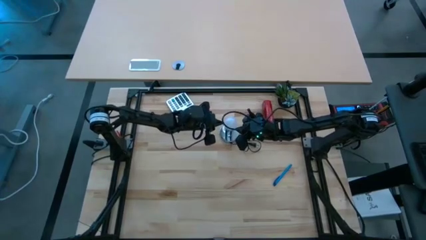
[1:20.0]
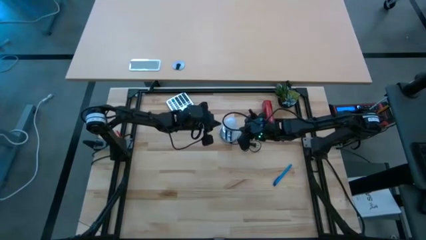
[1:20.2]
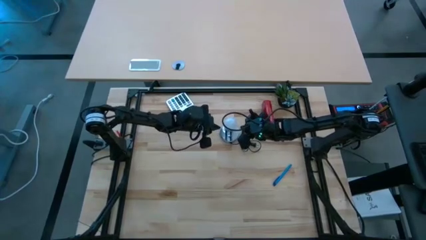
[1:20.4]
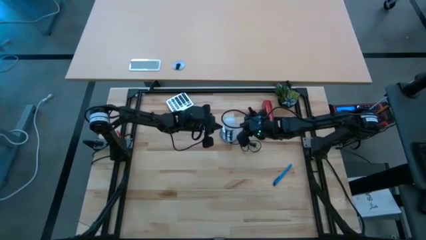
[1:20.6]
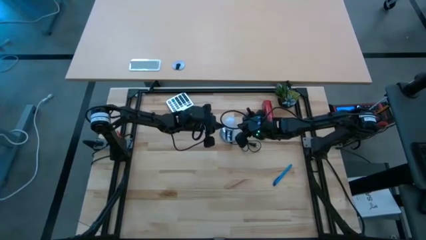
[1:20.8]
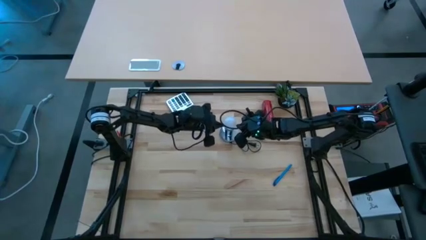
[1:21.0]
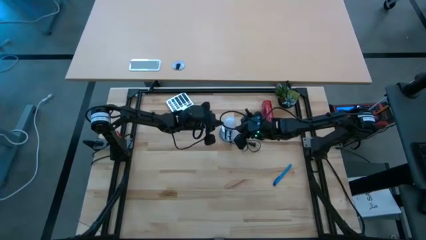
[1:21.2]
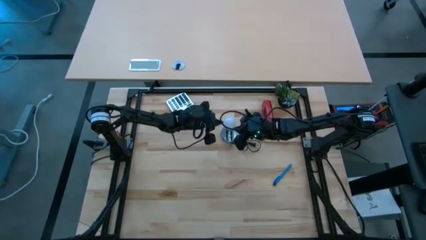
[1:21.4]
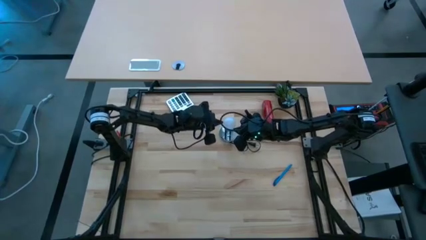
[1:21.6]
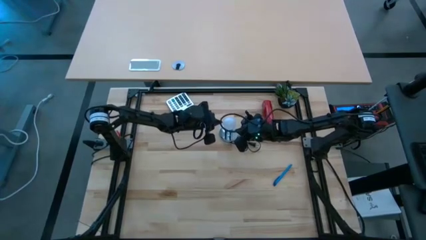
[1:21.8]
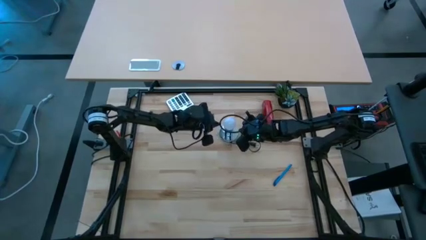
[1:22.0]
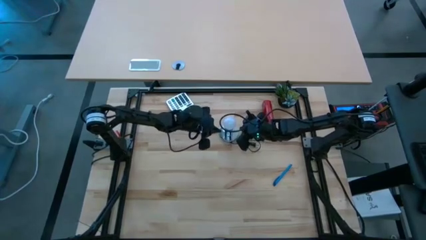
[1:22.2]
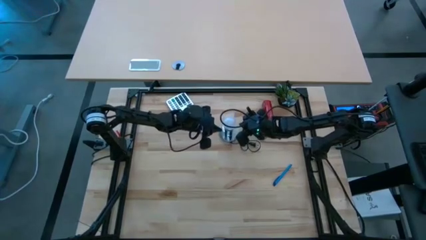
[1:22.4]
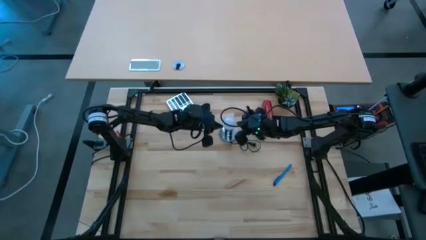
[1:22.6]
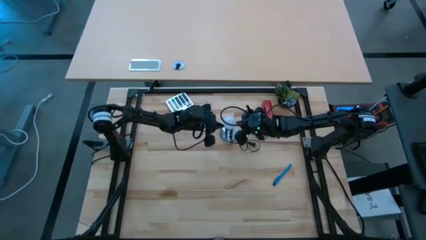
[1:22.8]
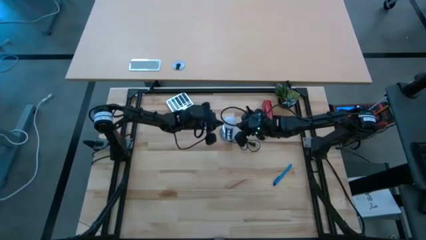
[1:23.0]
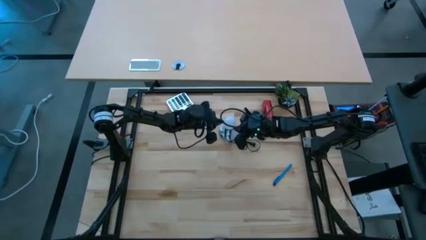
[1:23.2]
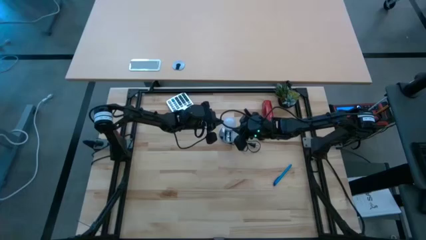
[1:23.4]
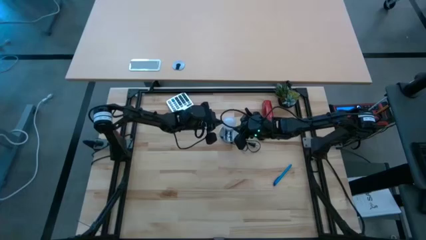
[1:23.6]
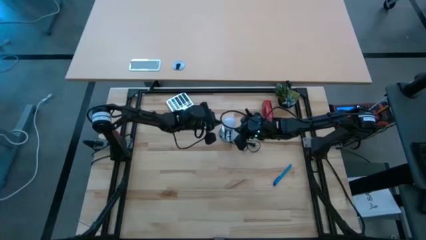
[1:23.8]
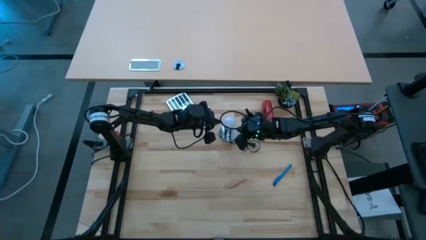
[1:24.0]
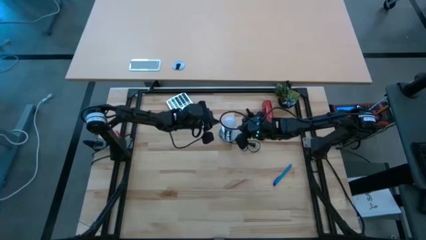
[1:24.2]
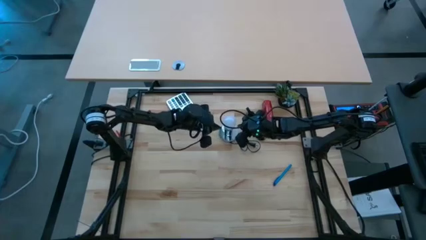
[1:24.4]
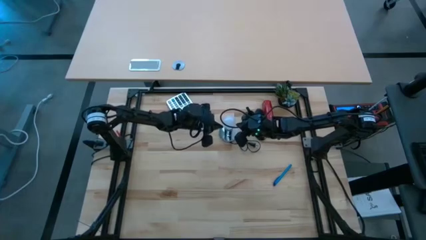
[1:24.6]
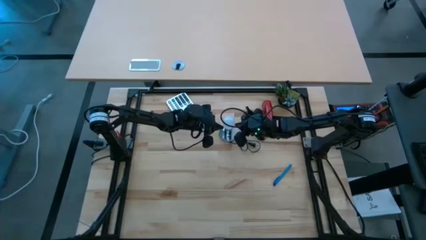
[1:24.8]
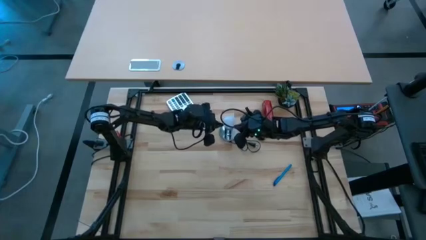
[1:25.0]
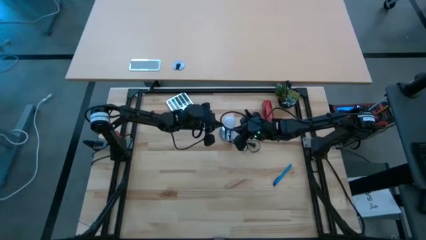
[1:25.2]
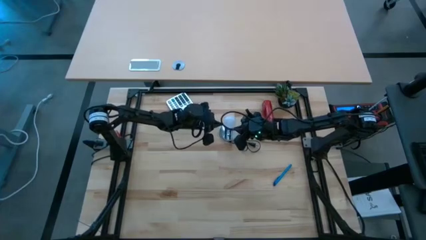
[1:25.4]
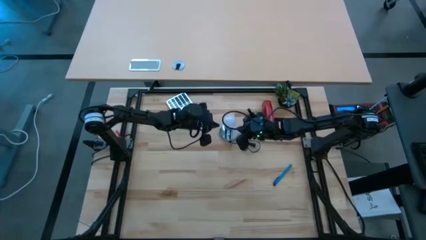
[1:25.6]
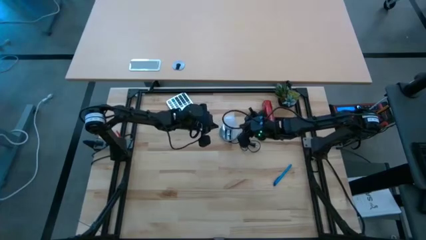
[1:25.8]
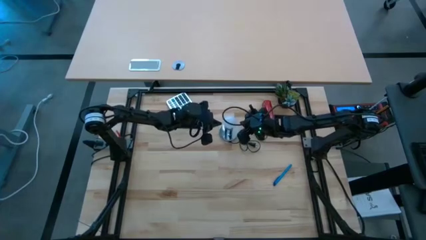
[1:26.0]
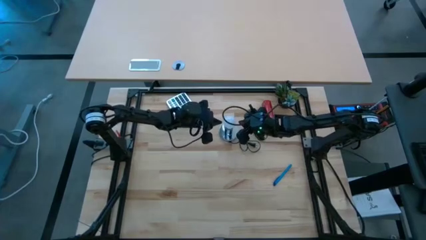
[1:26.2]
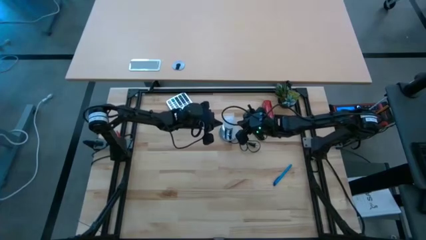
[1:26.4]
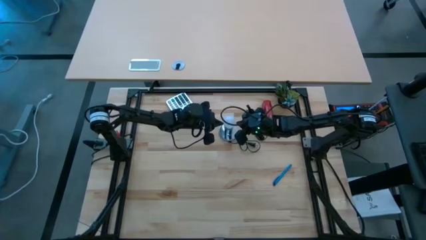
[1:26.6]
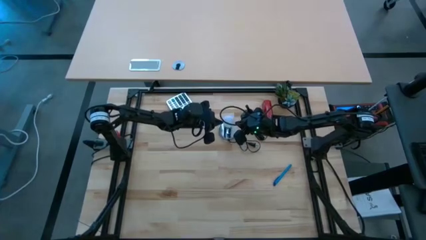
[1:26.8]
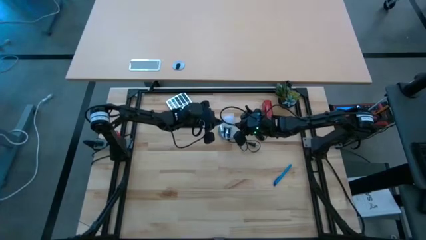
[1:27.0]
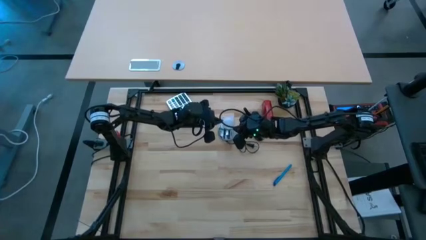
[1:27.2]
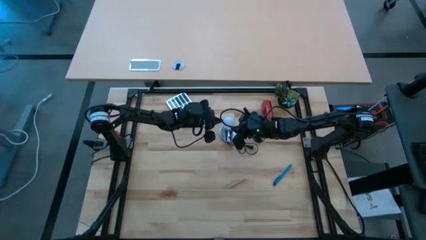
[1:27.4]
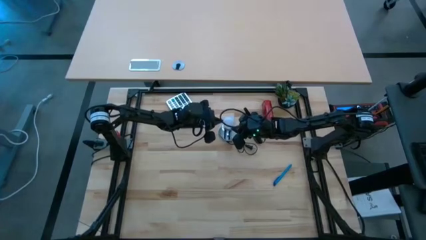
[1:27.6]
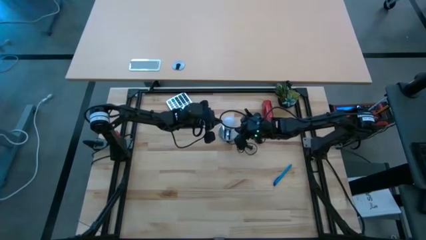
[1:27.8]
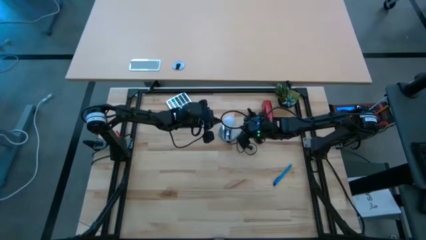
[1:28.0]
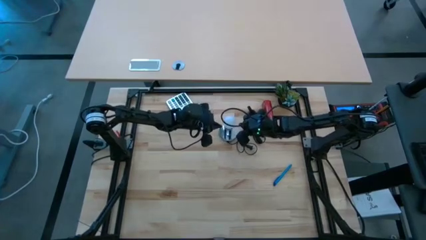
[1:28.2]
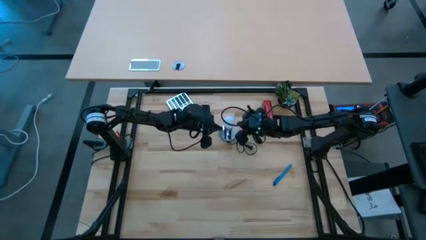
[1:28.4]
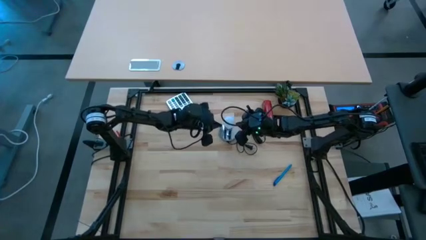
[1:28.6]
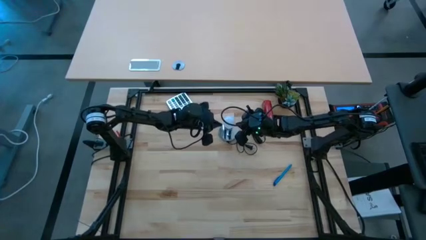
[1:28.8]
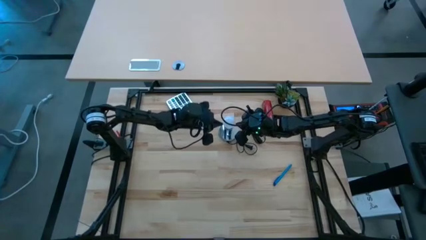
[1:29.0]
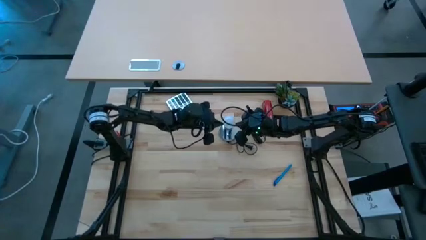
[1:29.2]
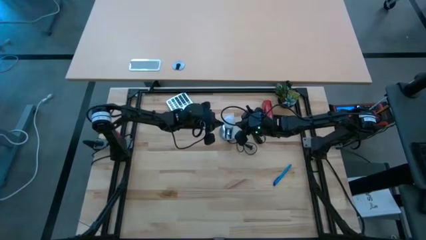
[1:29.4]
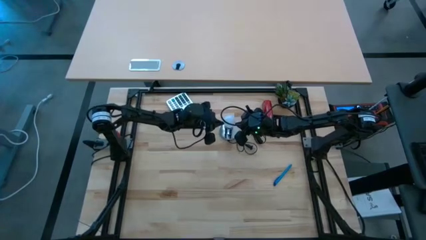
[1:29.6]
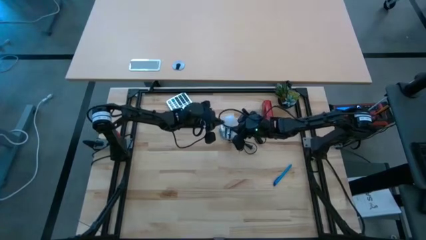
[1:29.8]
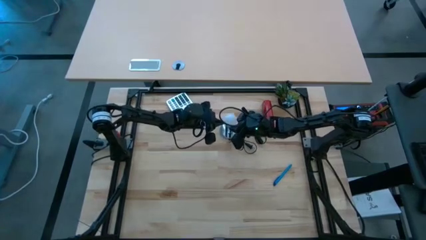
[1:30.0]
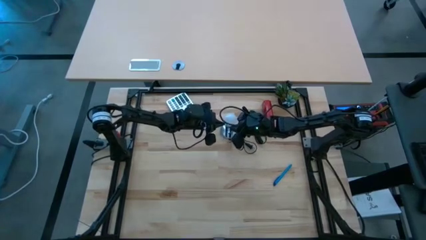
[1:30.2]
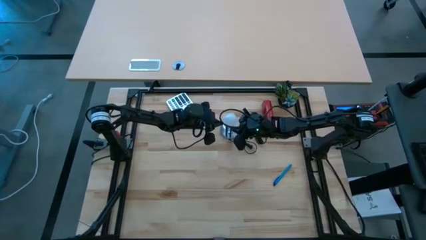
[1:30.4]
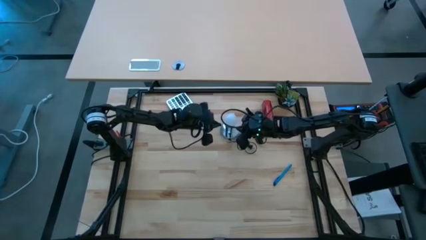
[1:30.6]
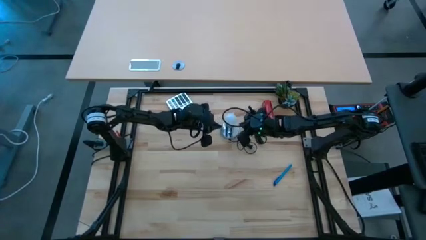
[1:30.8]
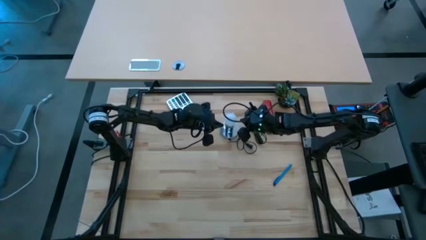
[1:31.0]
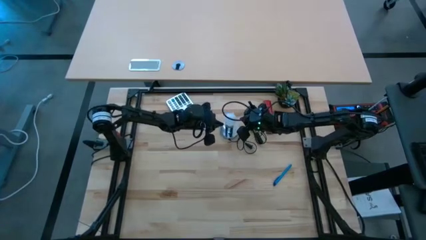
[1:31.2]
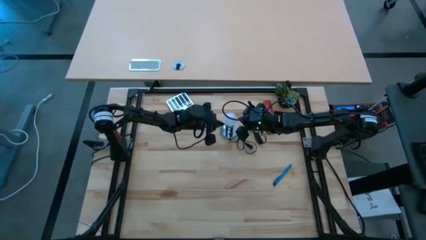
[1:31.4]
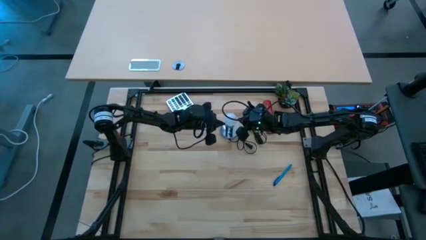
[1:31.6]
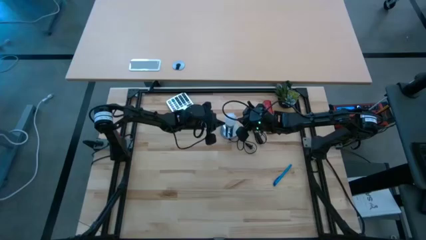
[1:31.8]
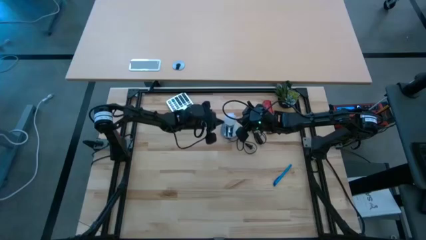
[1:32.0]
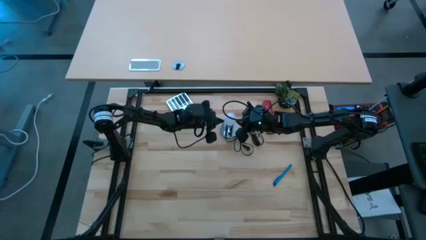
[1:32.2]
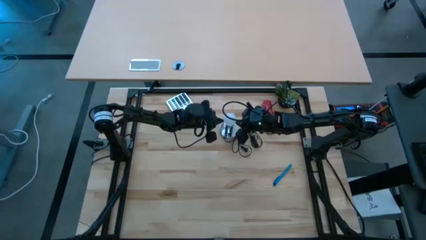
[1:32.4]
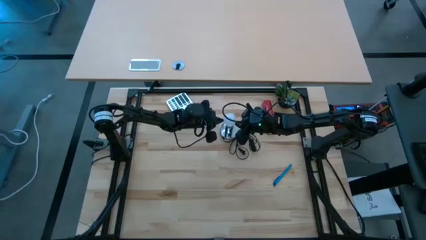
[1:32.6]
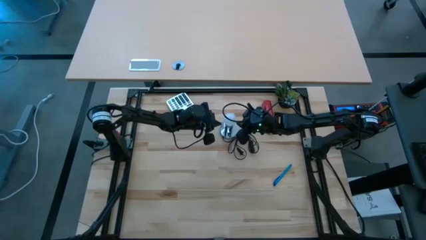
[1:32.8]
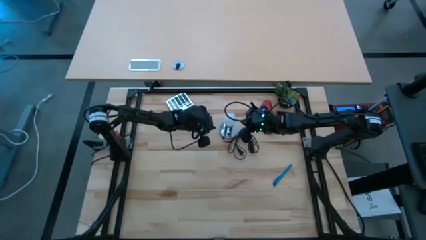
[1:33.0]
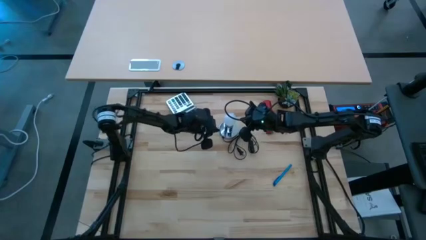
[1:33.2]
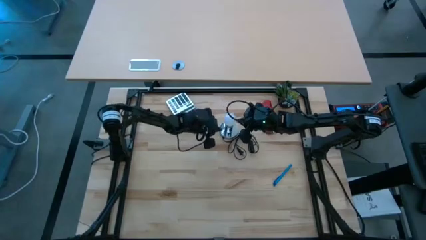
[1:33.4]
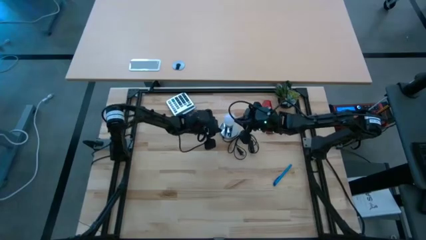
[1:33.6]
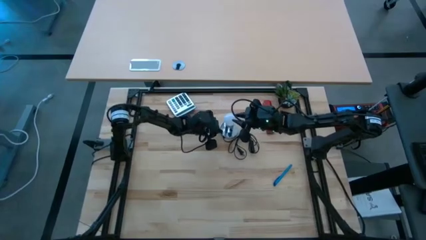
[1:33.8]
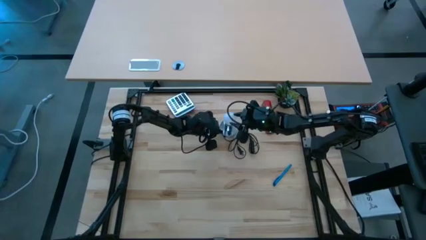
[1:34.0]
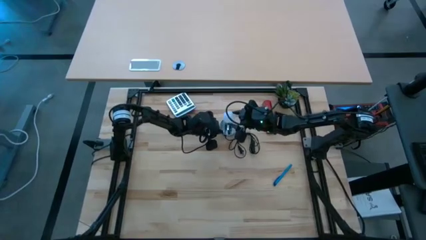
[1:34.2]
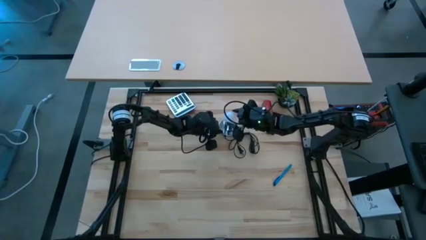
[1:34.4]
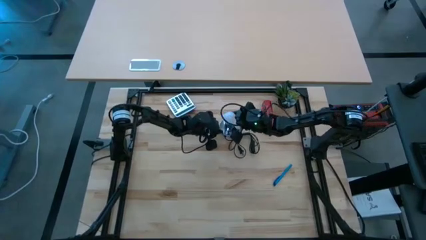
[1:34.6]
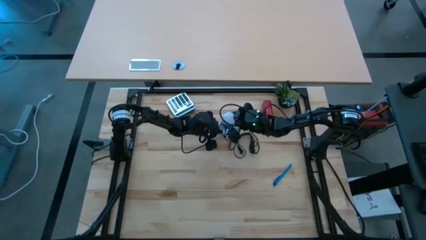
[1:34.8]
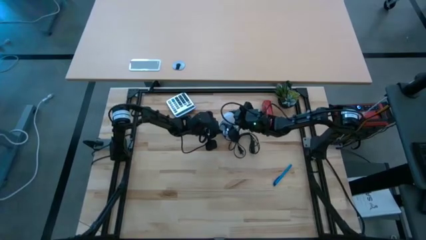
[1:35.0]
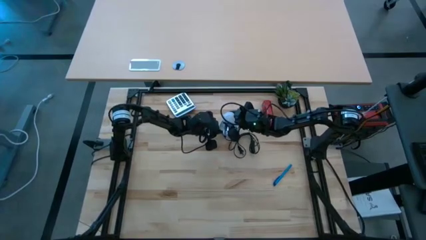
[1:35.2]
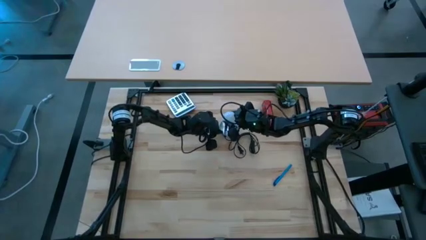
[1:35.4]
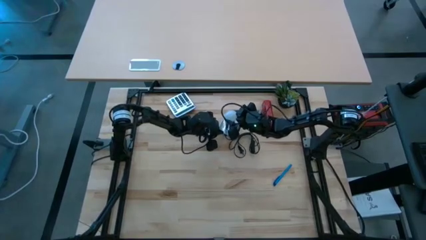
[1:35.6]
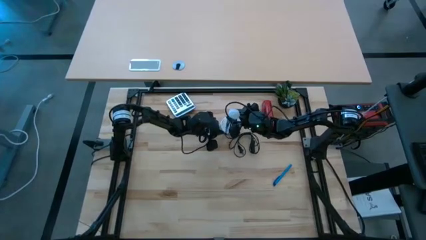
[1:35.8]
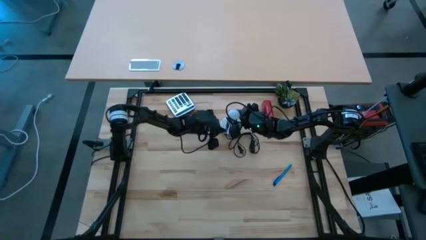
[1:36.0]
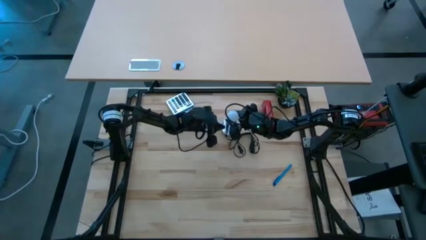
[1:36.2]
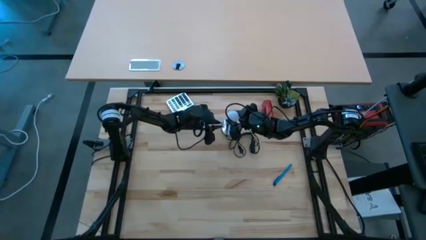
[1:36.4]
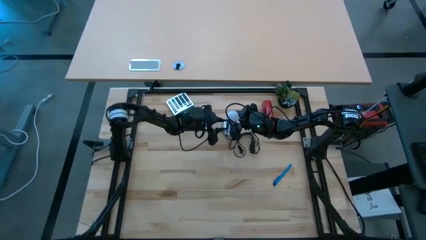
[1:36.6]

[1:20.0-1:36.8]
Task: Screw lightbulb
Insert the white lightbulb into the silver lamp
